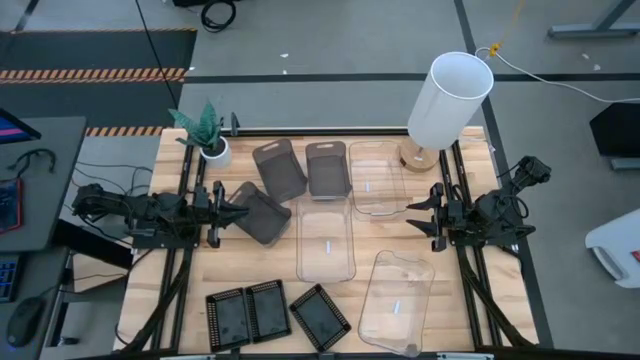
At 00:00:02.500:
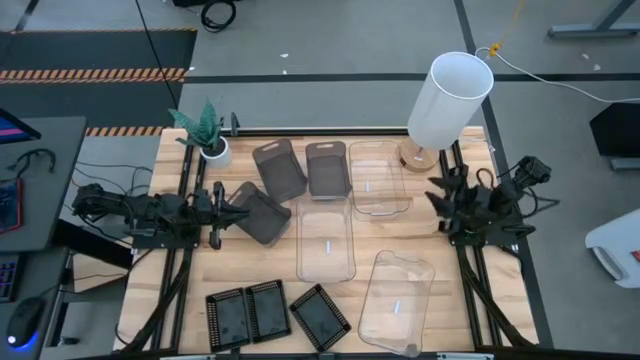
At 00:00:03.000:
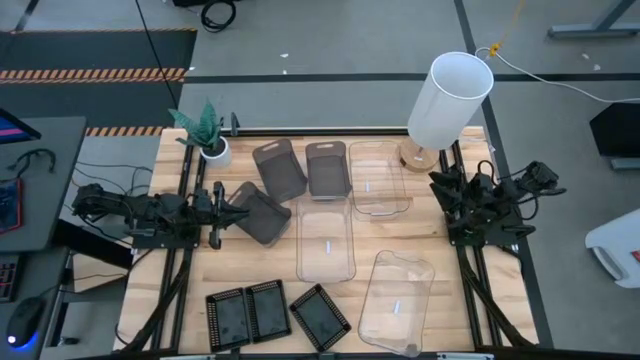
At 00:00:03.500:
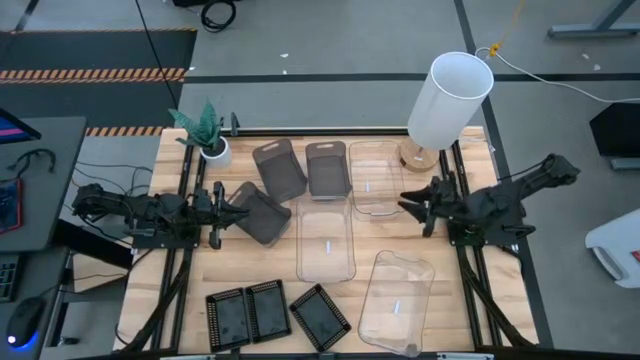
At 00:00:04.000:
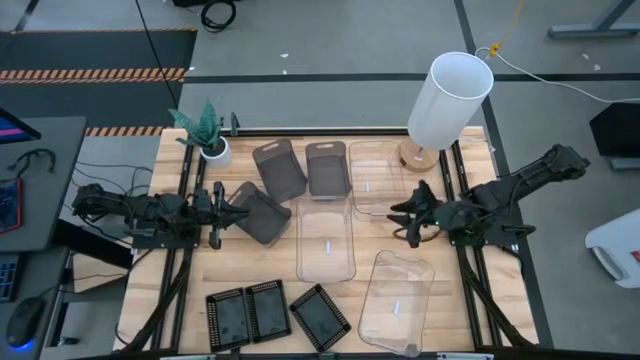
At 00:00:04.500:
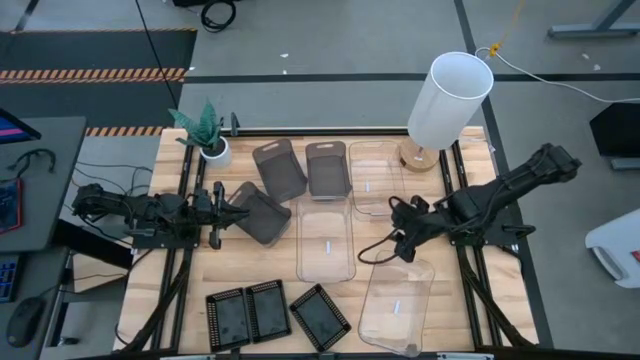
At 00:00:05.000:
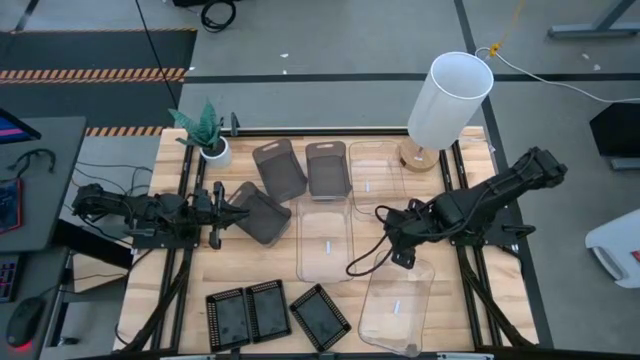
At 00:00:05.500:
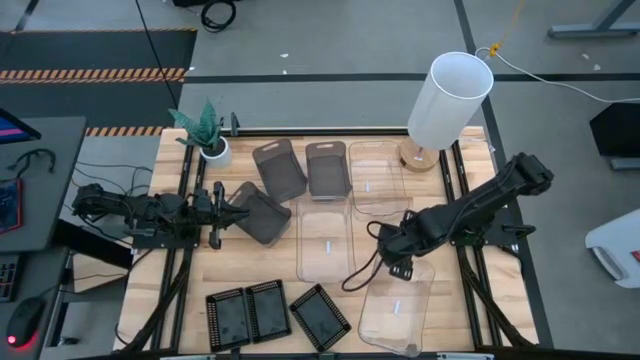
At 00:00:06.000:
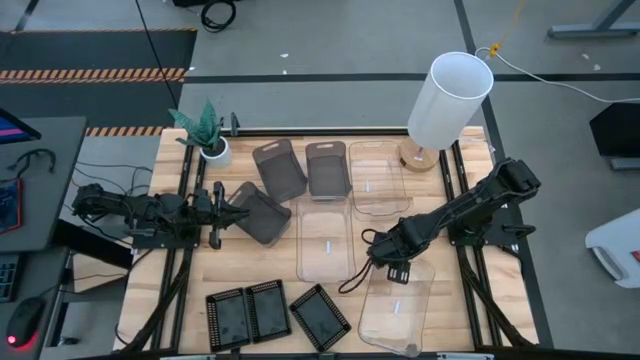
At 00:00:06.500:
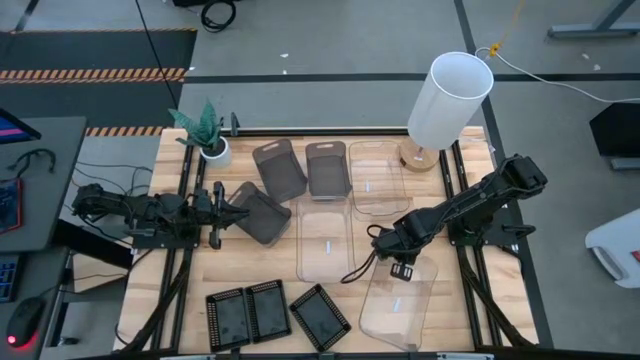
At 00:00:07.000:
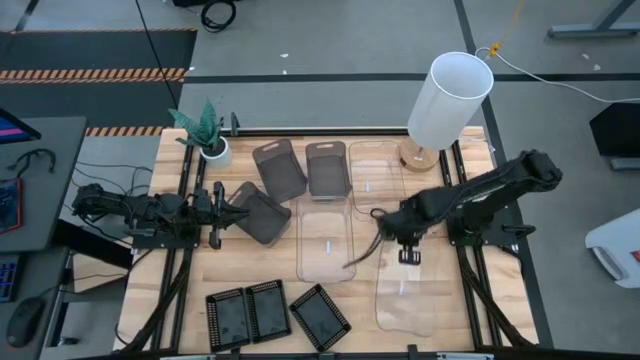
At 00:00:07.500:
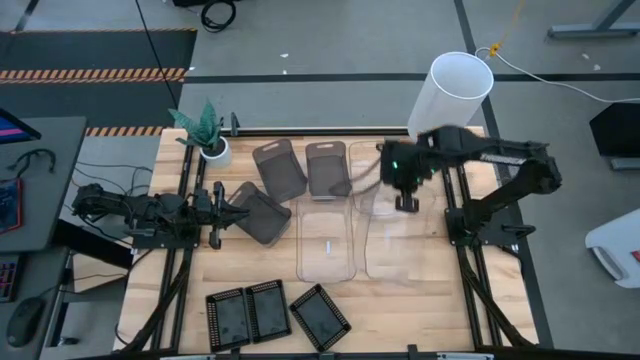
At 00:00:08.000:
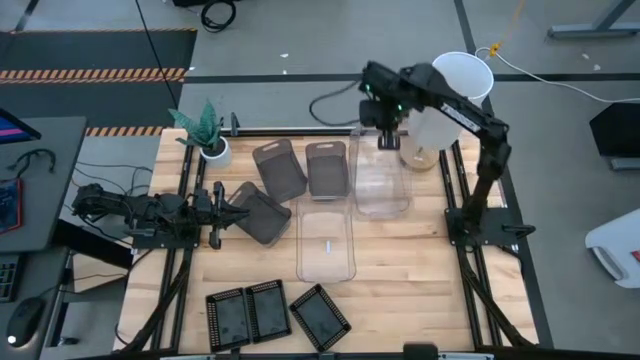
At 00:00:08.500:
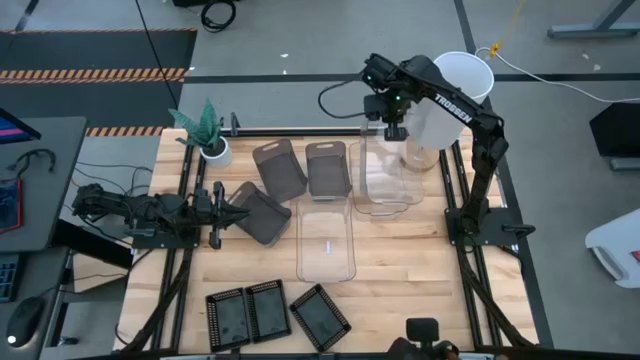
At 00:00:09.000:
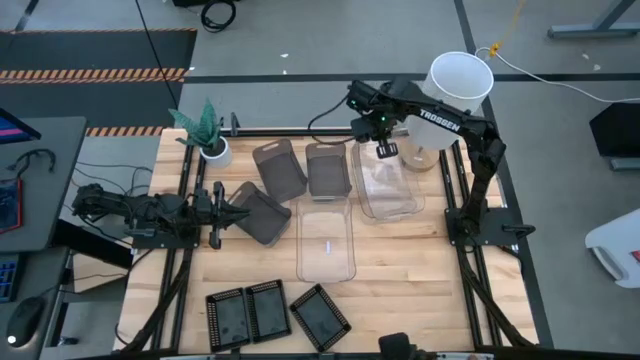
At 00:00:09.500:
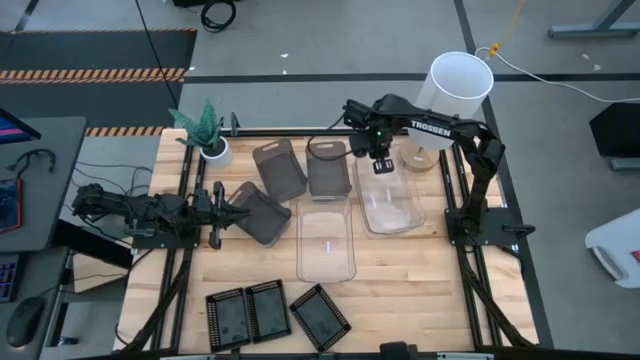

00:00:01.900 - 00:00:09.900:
Stack the bottom right transparent bin on the top transparent bin

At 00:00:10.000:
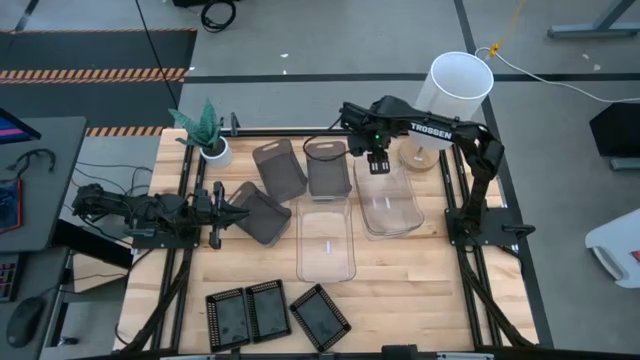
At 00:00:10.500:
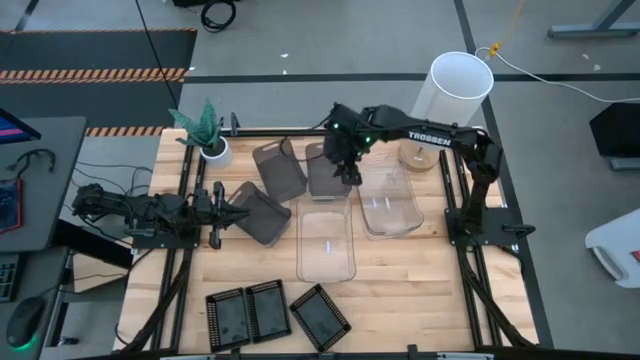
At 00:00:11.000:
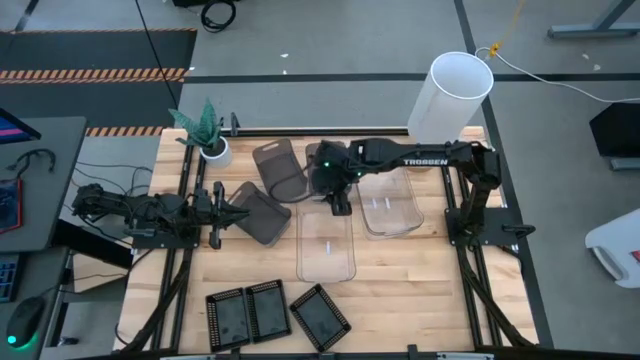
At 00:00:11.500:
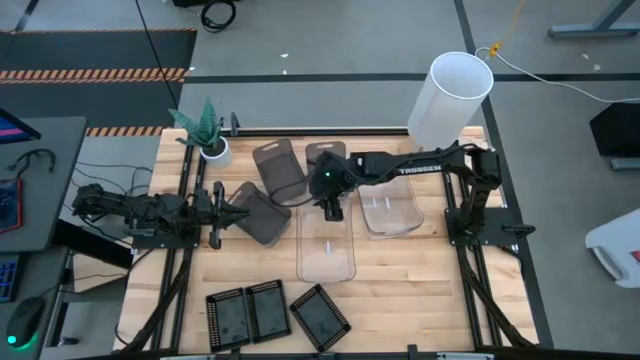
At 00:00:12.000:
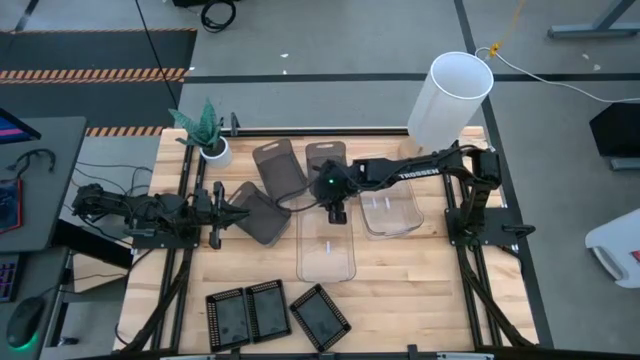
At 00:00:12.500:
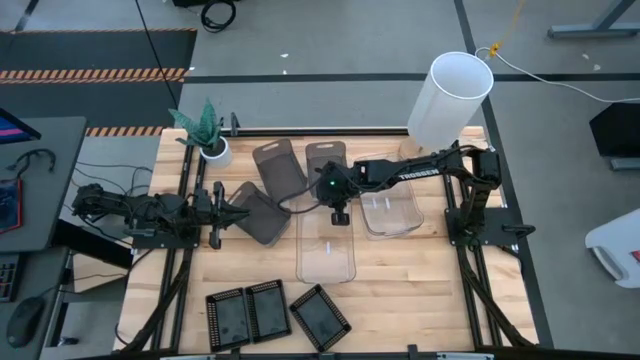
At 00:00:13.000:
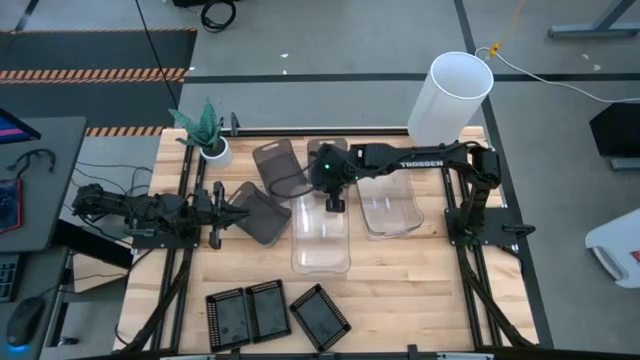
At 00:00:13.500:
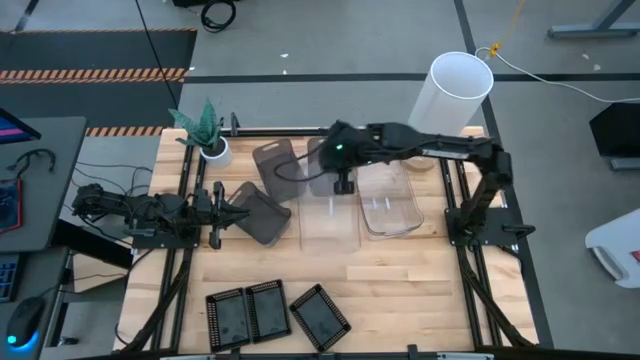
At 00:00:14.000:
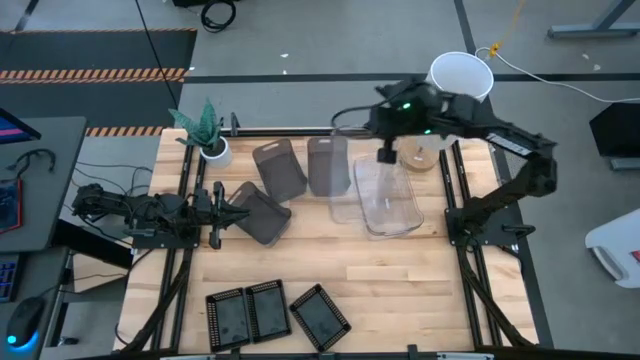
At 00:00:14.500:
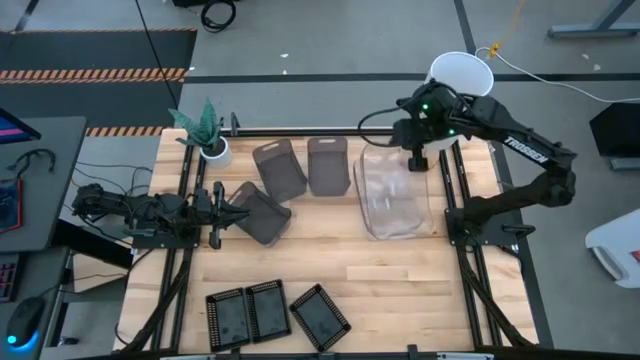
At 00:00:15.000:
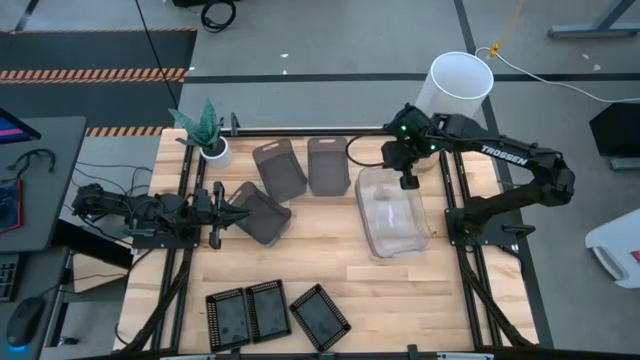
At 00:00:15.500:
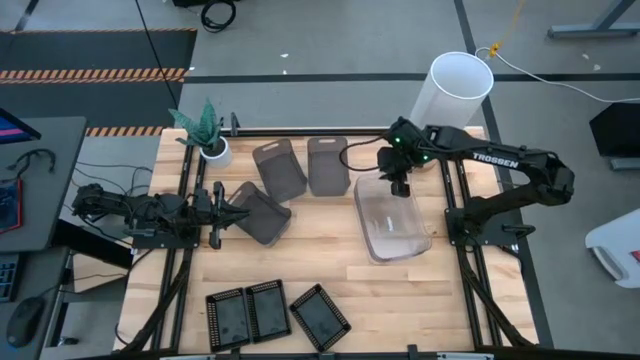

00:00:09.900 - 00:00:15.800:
Stack the left transparent bin on the transparent bins

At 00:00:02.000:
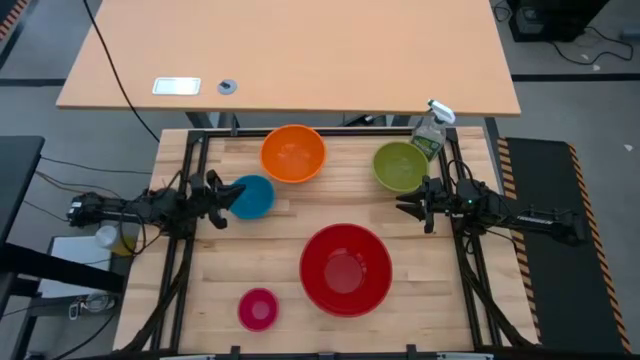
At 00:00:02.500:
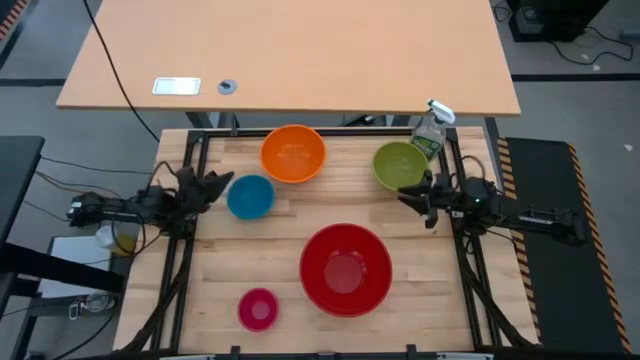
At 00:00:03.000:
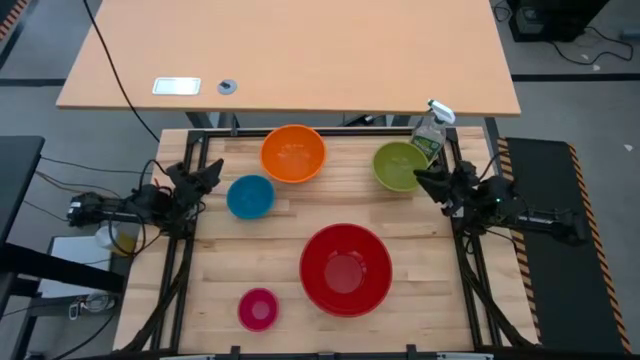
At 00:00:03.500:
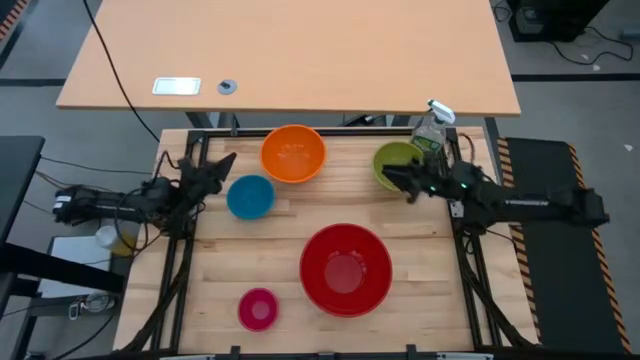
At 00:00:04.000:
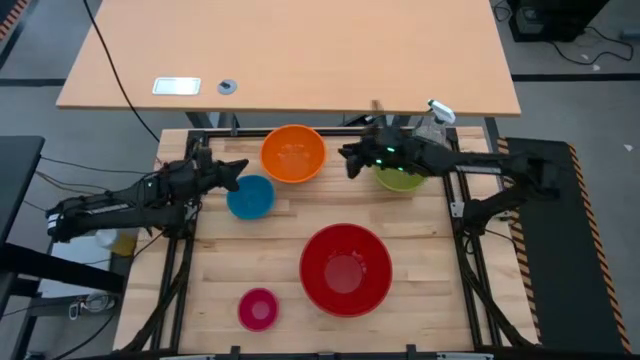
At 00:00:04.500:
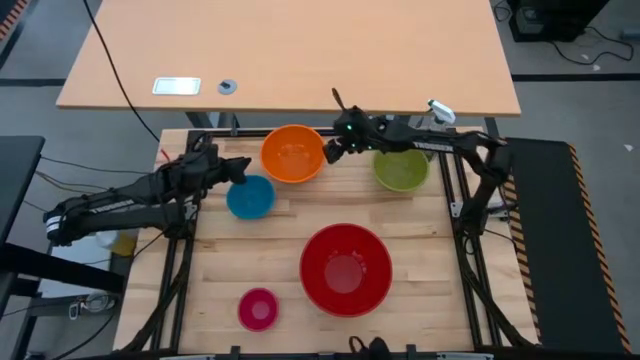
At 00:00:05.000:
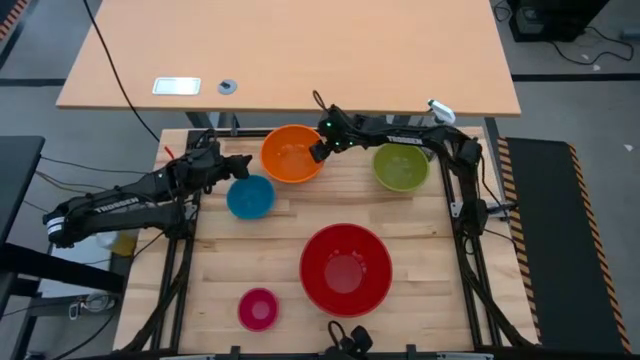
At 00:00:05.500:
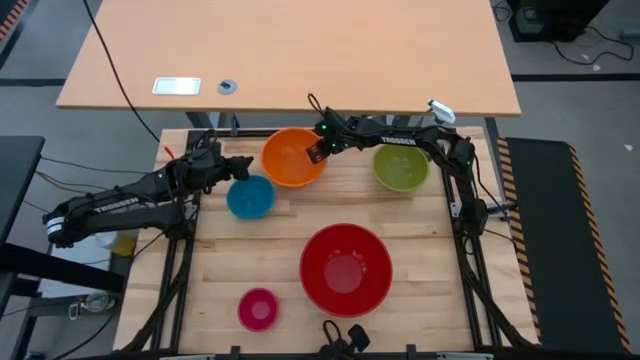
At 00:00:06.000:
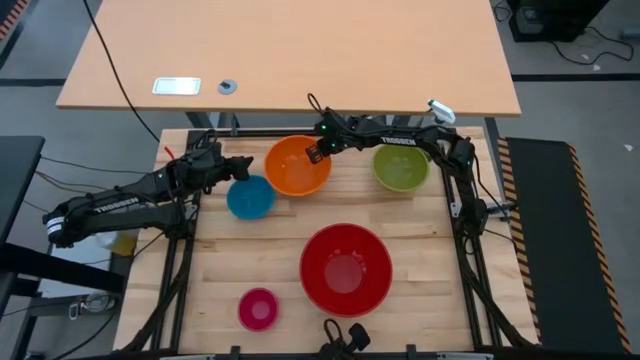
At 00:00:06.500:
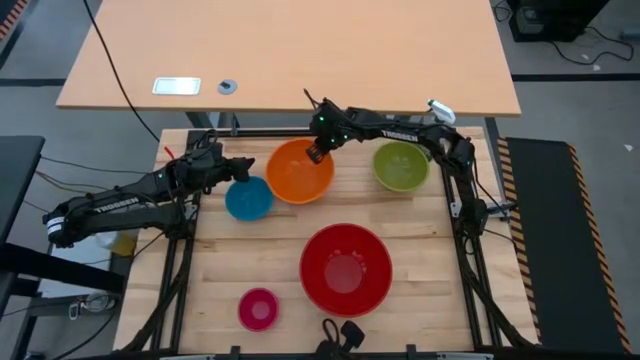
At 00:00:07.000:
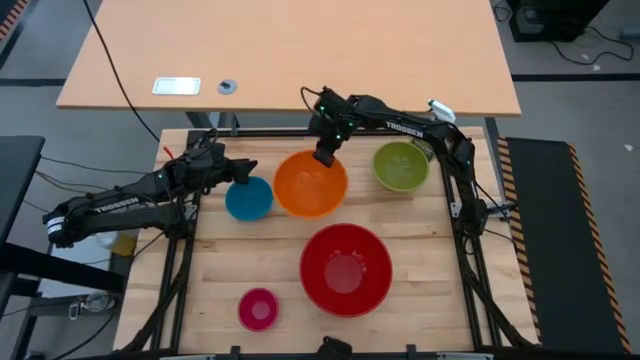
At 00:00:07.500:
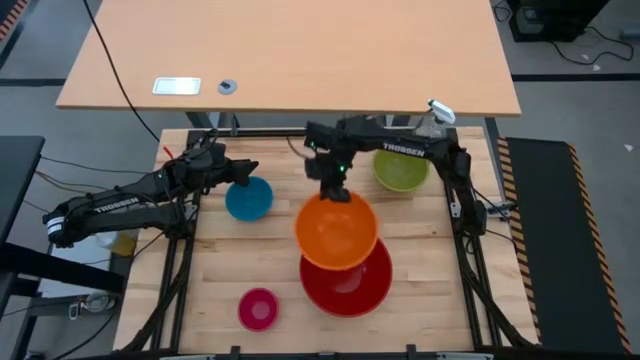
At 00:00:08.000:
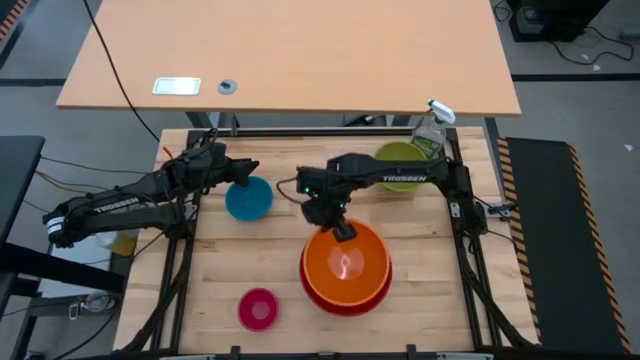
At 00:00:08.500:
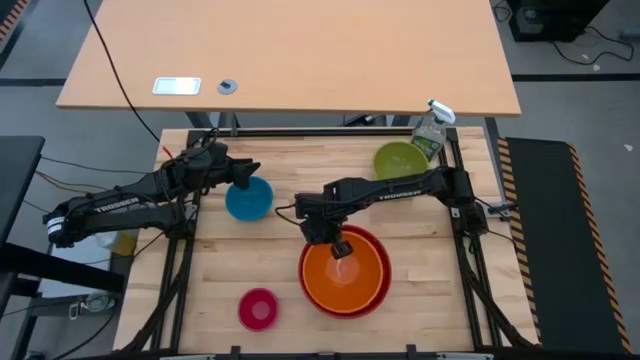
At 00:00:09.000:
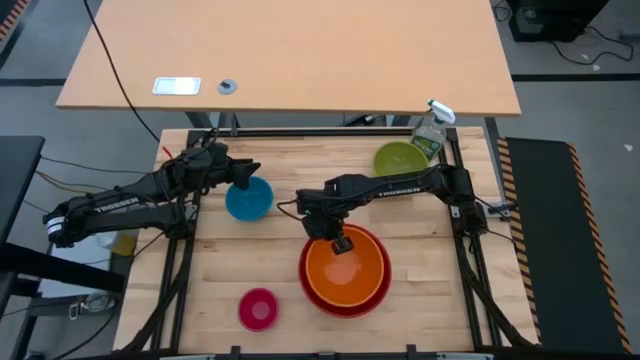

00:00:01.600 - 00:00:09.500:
Stack the orange bowl on top of the red bowl
